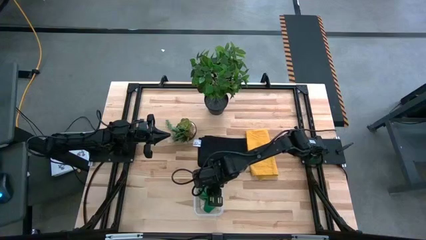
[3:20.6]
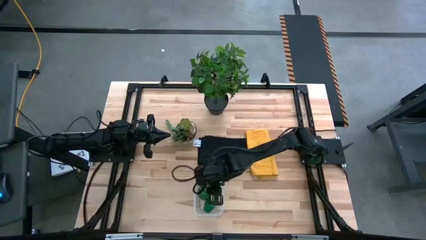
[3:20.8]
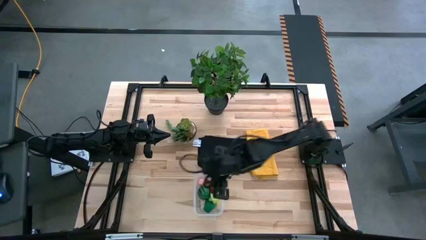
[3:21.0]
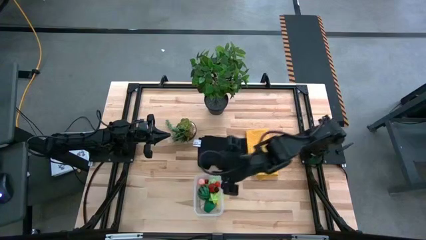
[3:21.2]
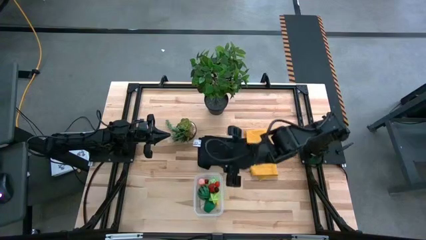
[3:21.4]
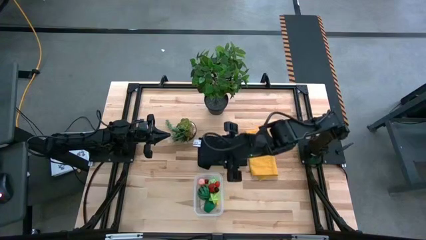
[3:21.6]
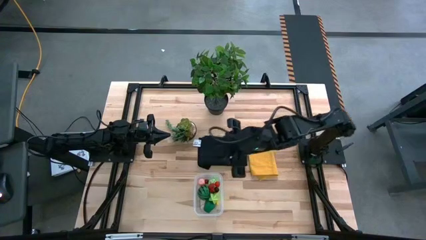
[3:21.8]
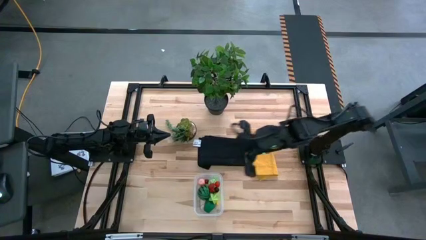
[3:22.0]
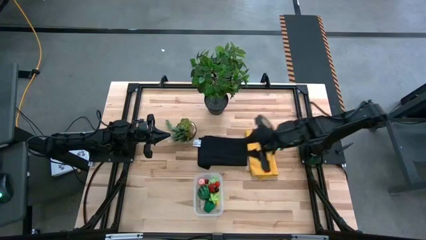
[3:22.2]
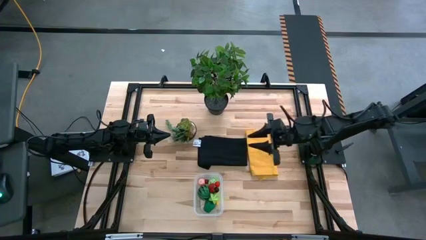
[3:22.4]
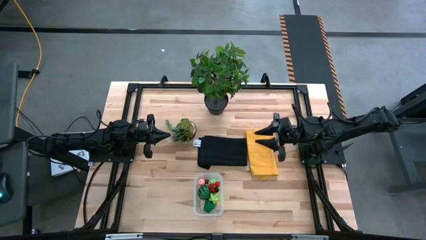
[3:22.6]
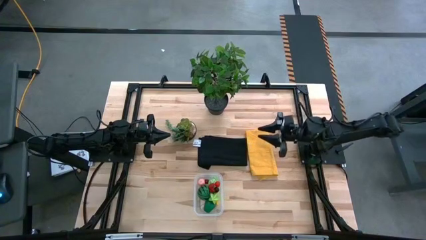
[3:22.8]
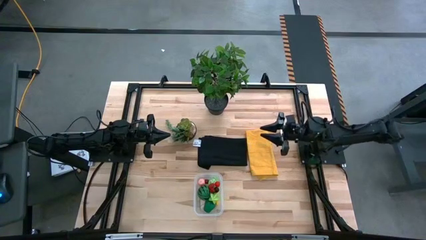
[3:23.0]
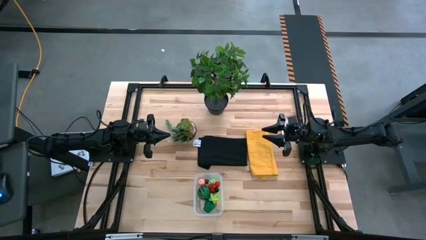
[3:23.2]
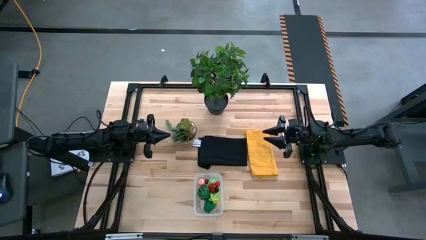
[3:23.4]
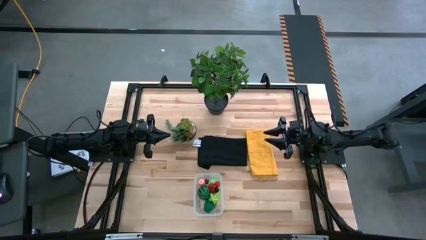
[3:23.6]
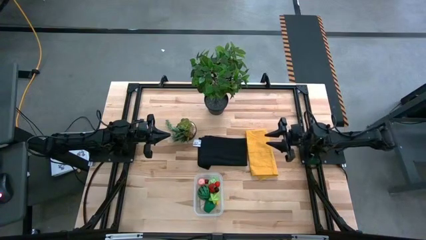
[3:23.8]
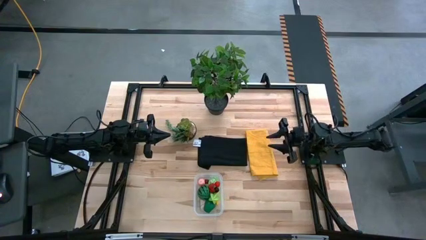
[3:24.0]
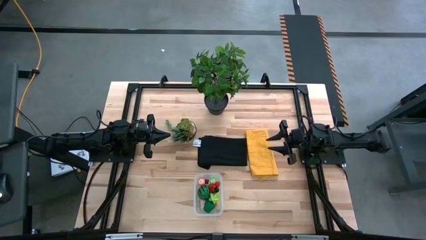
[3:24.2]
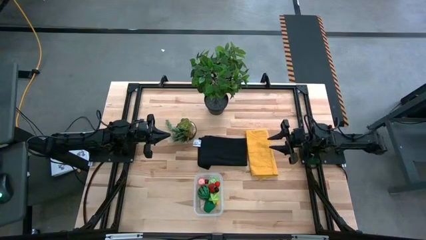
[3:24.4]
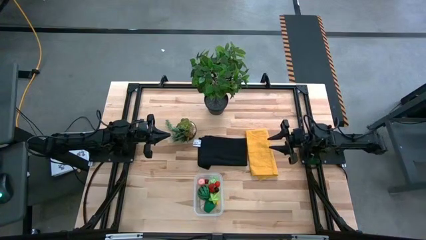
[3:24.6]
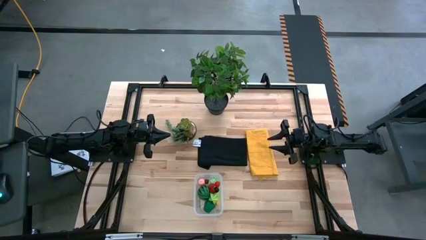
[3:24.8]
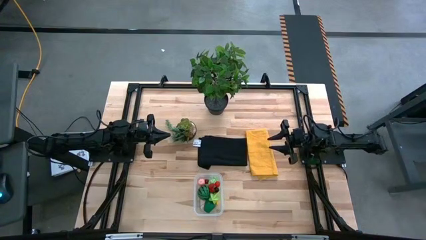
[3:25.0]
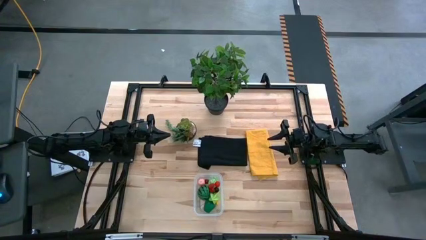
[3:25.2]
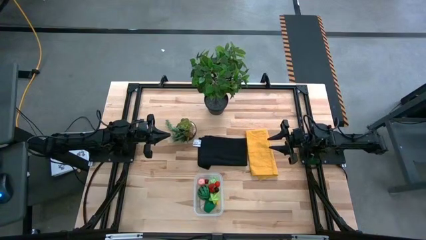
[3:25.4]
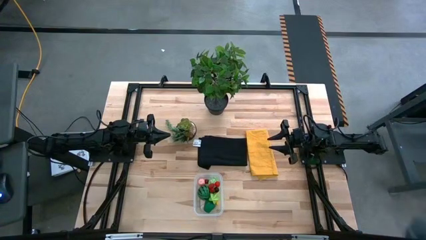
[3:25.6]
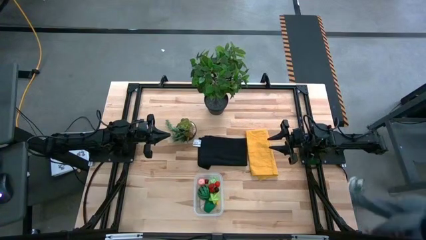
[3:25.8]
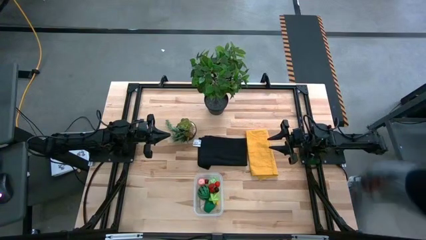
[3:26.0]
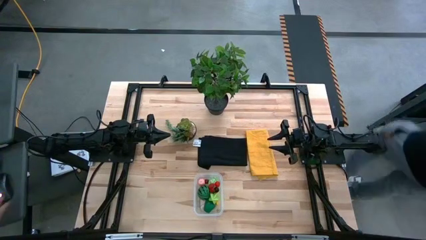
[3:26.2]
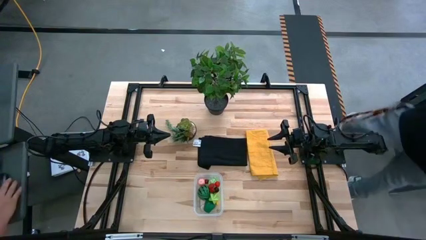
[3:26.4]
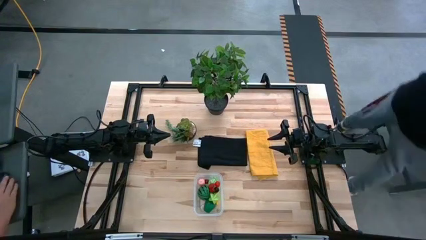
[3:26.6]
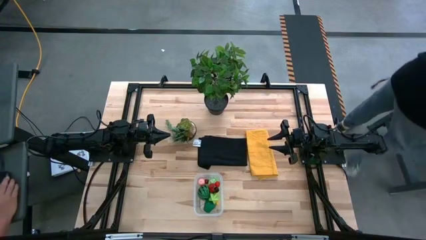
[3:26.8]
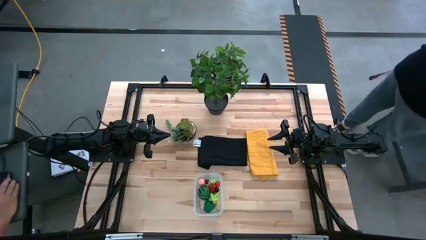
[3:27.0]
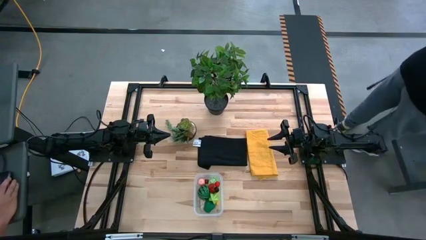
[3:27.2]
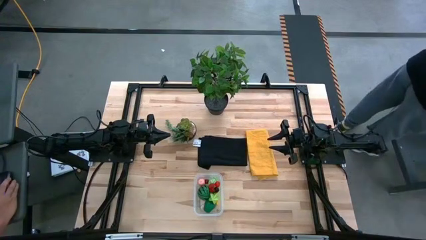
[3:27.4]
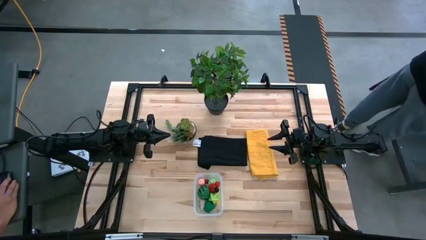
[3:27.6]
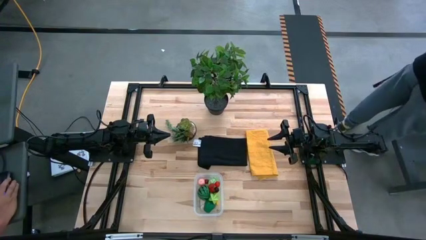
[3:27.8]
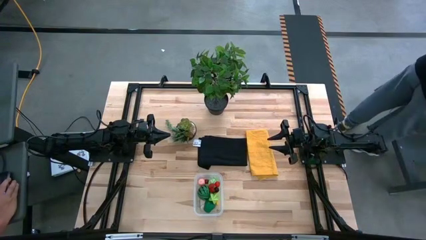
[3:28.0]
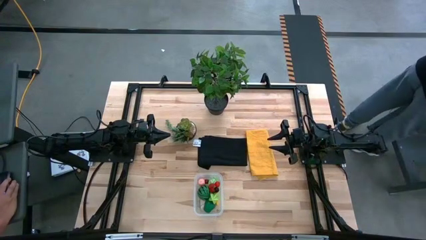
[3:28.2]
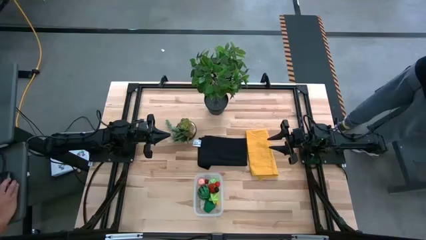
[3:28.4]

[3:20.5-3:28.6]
Task: Pick and placing Produce into tupperware
Return to Home Position
